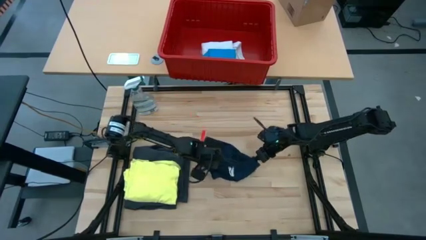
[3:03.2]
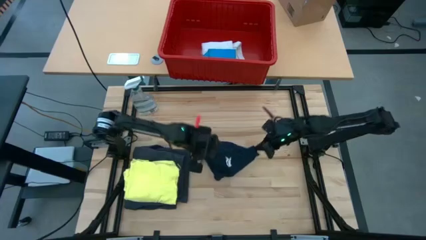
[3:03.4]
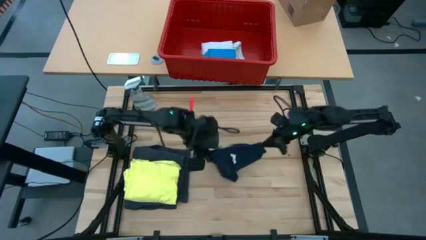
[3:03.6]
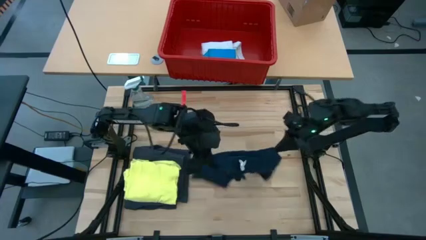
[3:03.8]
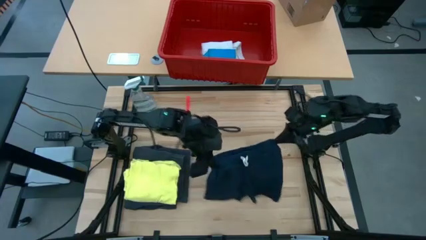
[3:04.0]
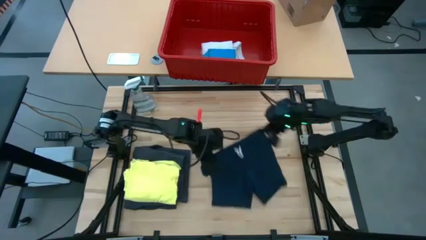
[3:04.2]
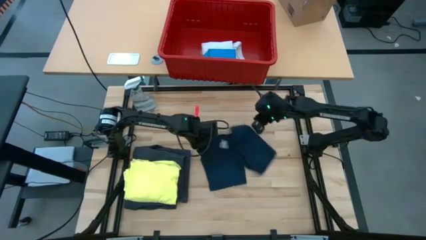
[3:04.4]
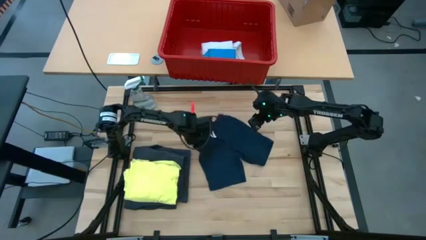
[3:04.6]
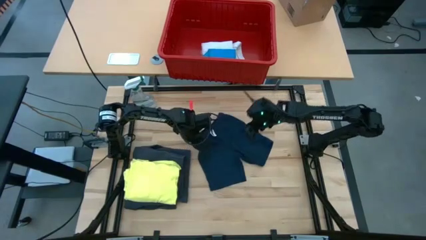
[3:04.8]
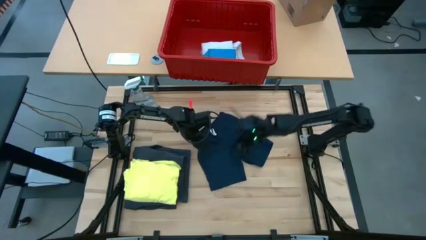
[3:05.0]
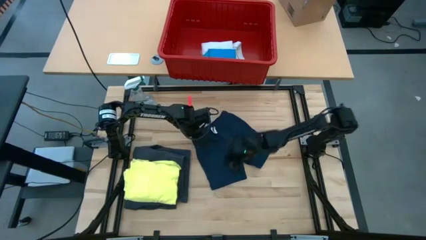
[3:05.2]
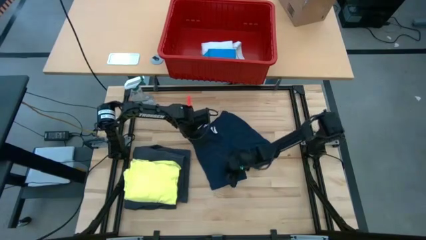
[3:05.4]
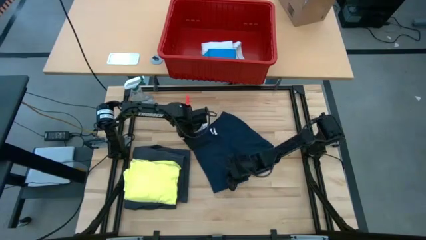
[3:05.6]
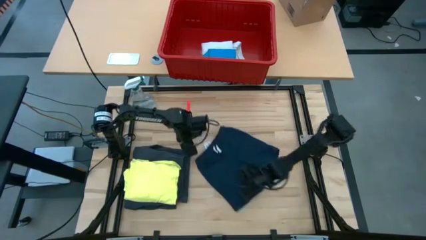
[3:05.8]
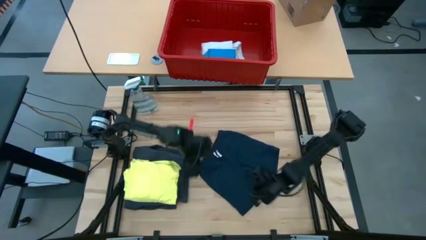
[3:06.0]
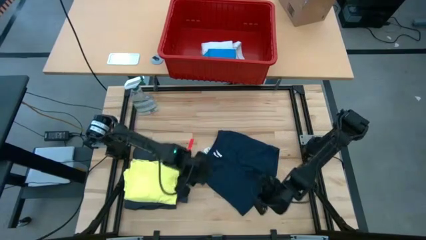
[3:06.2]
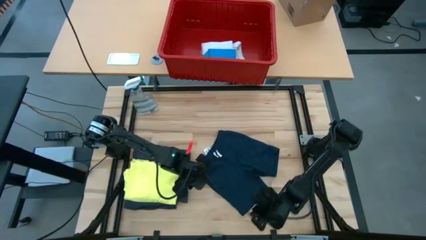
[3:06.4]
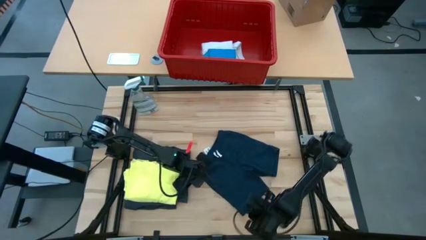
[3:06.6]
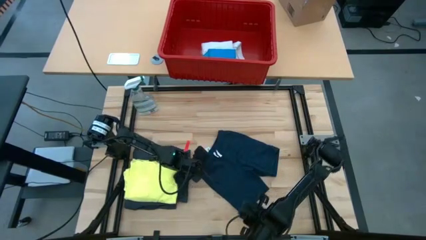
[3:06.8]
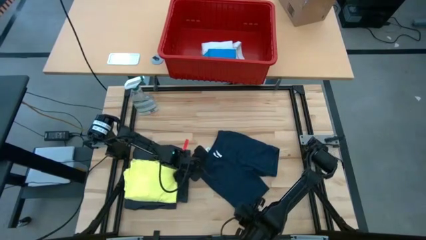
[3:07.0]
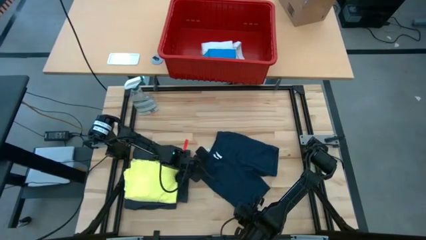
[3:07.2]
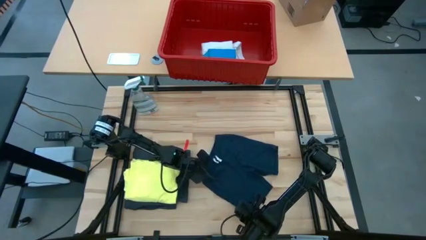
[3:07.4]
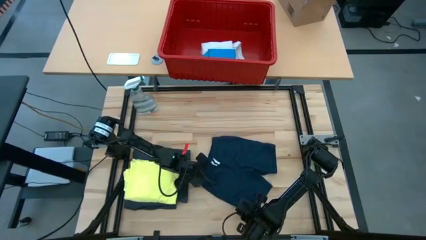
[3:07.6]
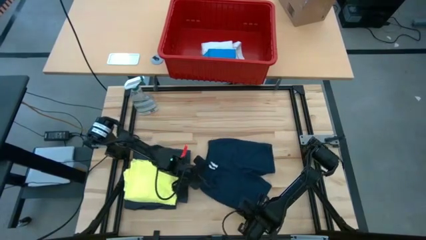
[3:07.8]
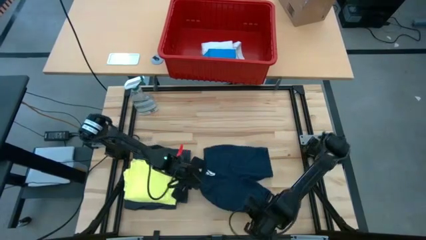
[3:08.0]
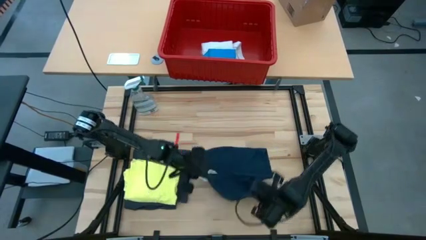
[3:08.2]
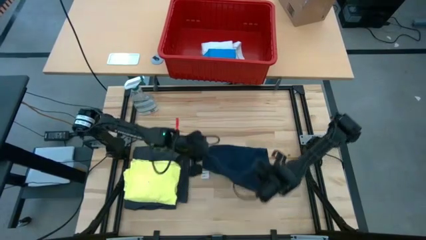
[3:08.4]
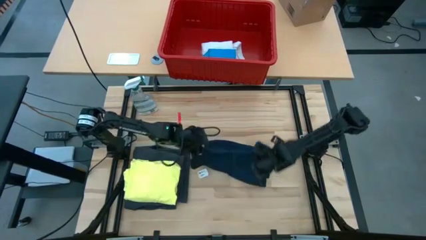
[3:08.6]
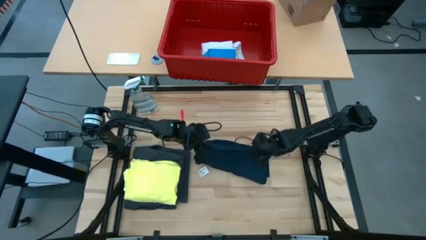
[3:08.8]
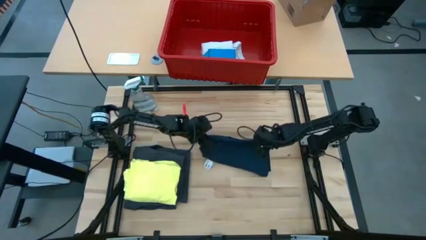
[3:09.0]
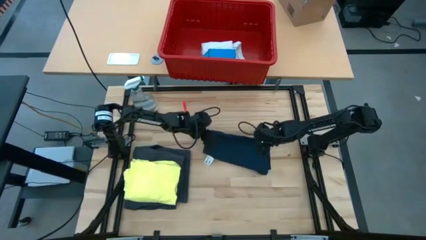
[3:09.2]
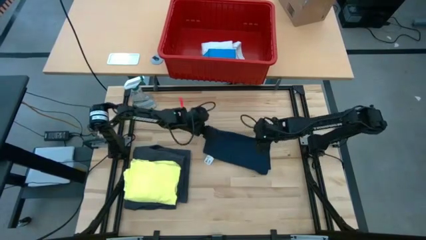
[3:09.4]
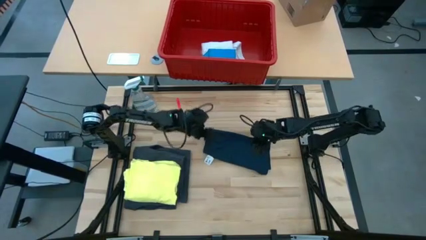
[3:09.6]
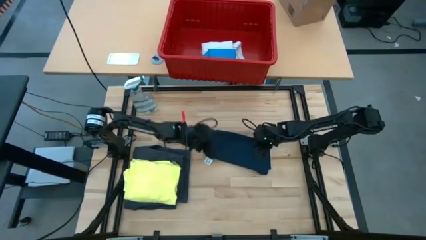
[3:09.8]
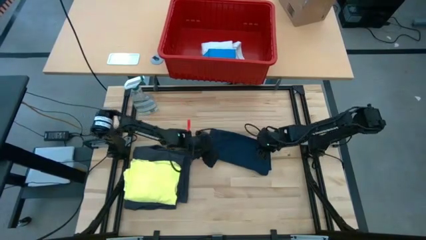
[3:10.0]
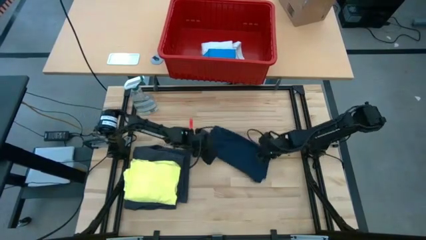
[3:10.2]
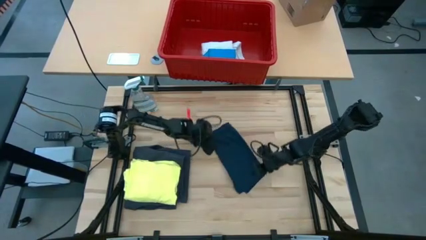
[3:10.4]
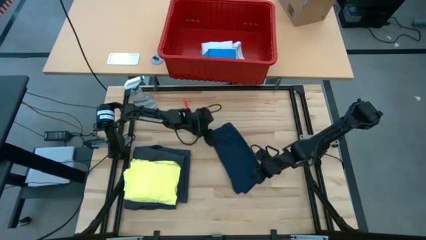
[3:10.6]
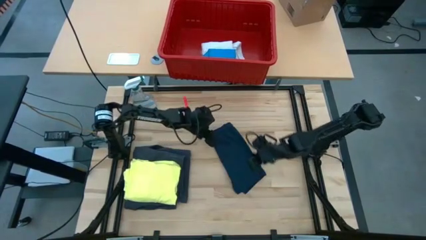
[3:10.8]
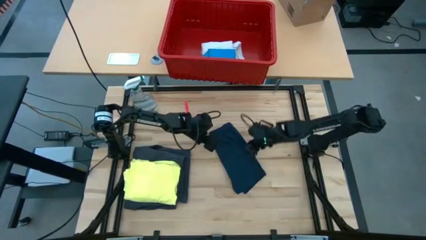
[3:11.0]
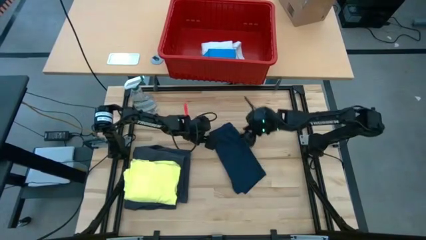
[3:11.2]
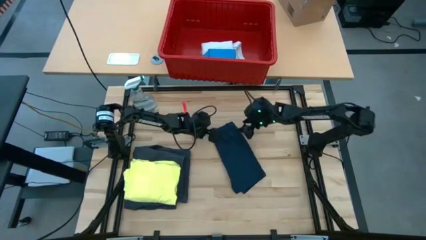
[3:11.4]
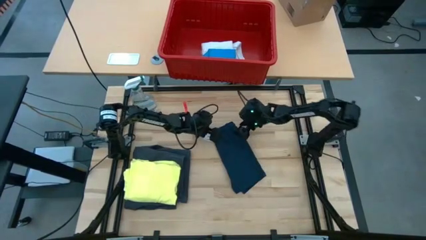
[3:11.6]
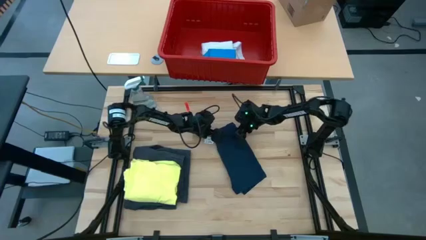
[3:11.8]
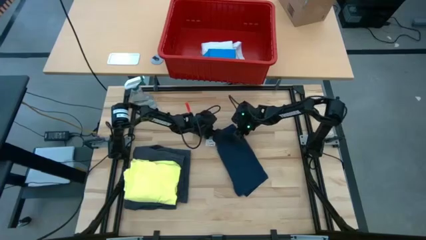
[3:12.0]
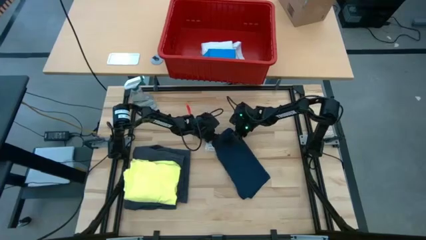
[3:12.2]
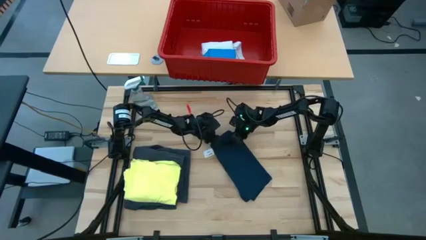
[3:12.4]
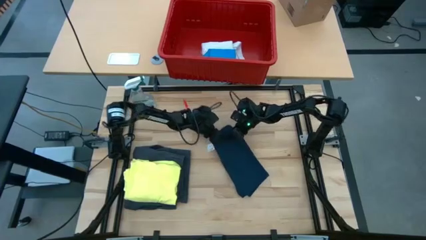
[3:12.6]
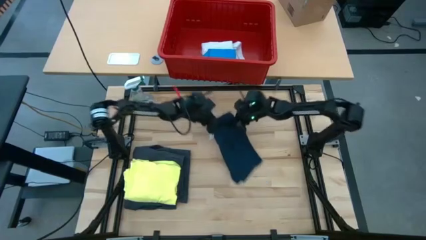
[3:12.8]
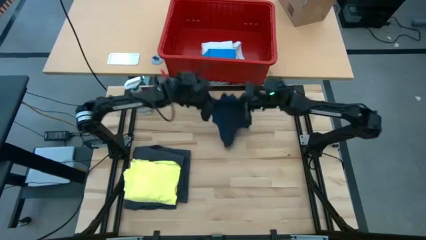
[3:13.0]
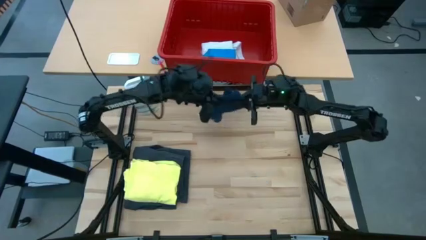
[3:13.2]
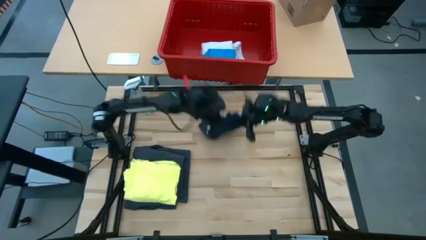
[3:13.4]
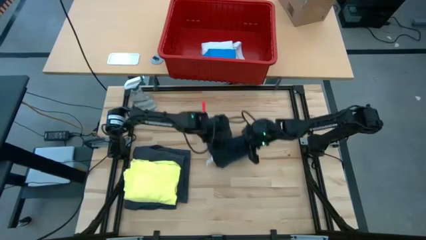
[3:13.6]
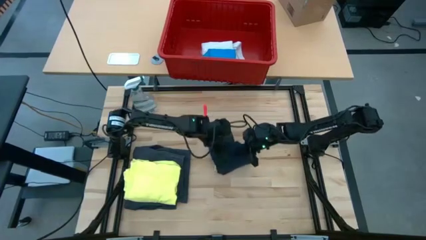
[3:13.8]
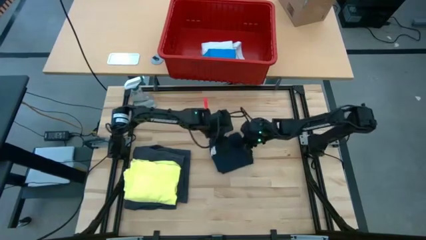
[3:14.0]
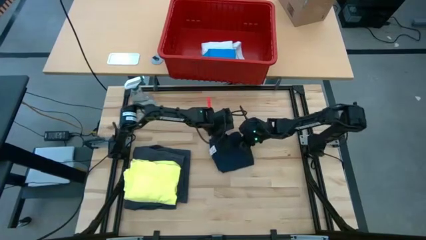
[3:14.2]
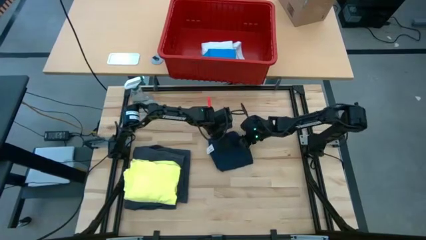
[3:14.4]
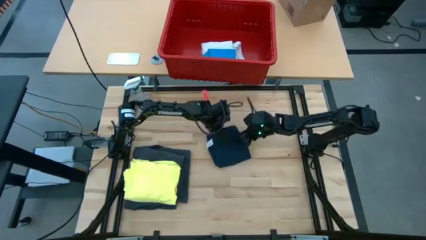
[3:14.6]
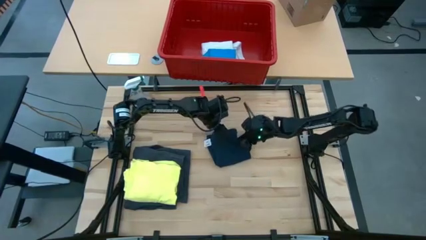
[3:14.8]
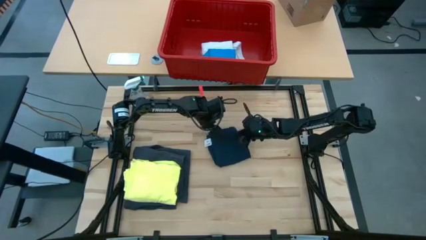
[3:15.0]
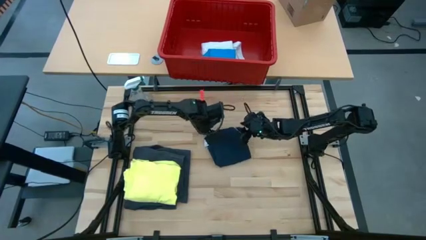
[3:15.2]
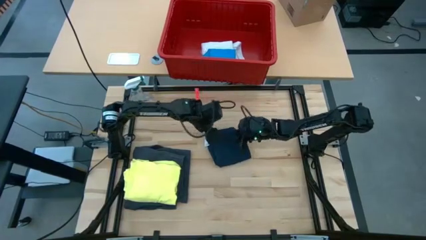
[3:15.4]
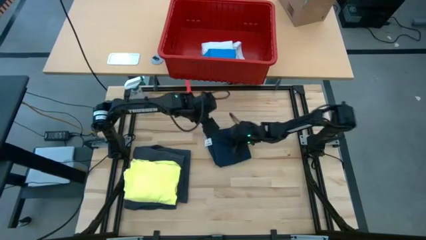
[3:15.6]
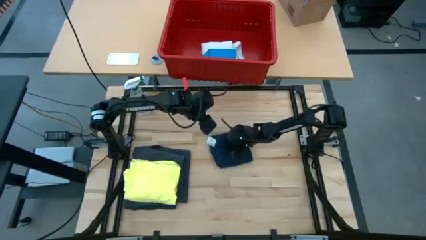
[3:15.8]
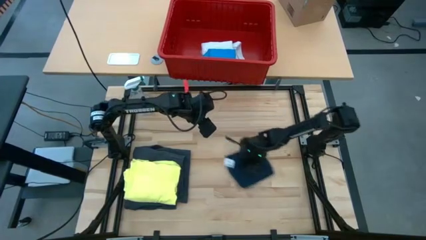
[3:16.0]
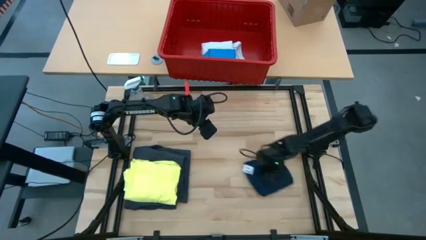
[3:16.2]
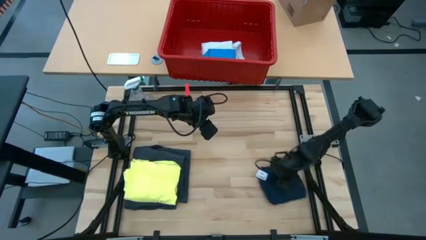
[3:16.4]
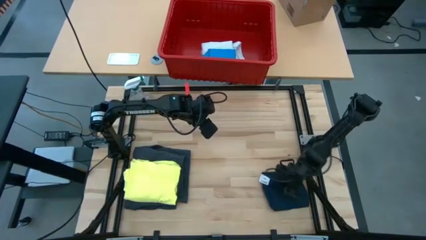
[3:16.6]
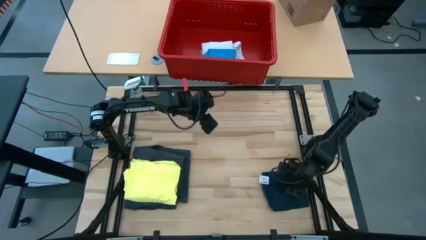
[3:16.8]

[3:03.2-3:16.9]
Task: Fold Laundry from Bin
Fold the dark blue short

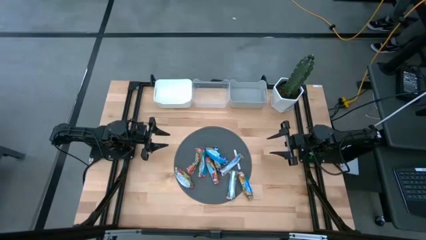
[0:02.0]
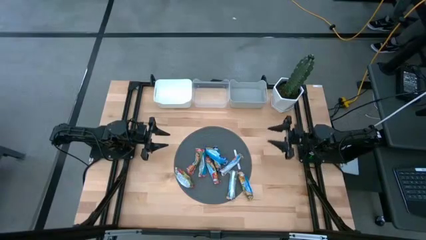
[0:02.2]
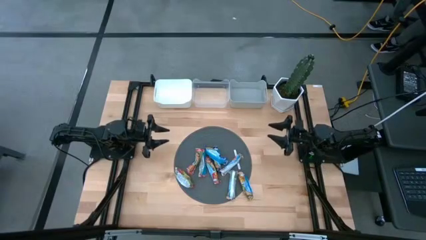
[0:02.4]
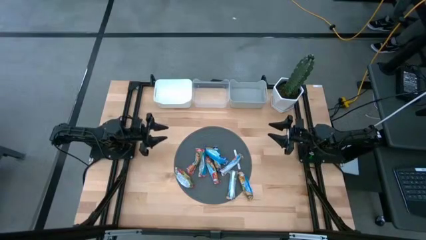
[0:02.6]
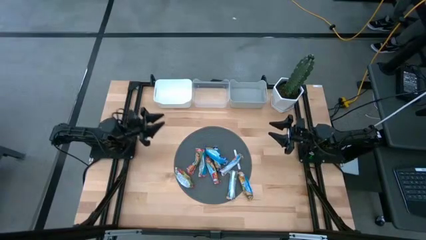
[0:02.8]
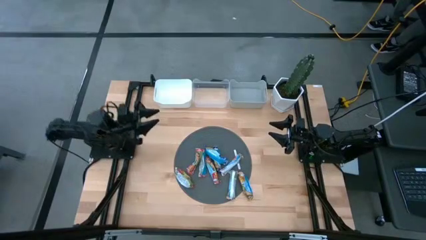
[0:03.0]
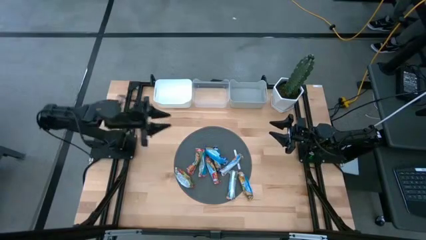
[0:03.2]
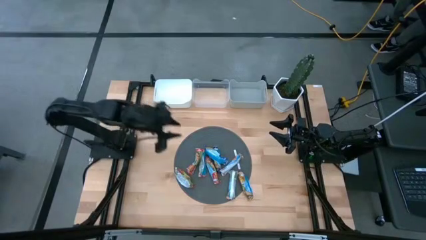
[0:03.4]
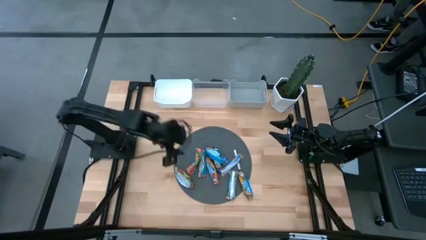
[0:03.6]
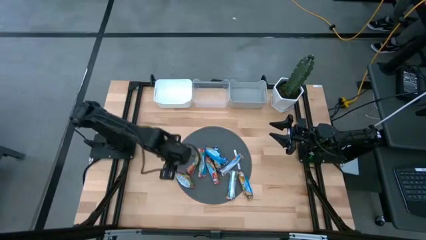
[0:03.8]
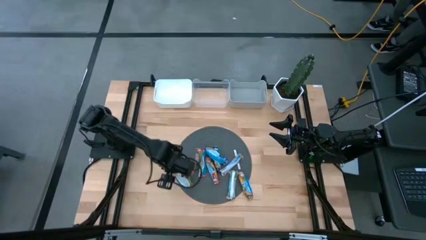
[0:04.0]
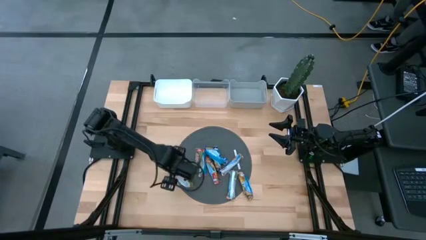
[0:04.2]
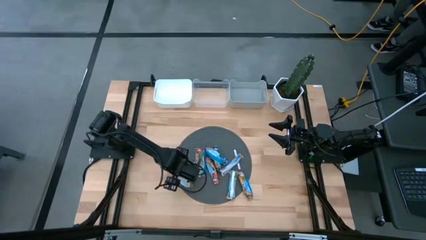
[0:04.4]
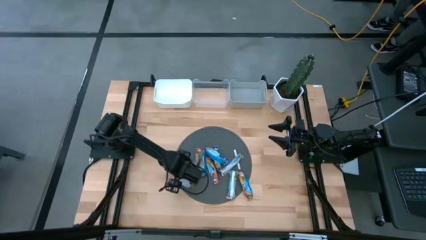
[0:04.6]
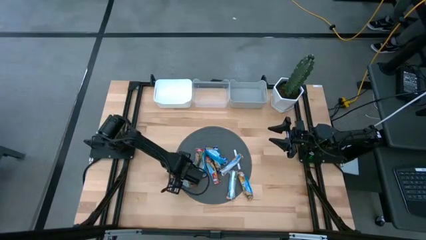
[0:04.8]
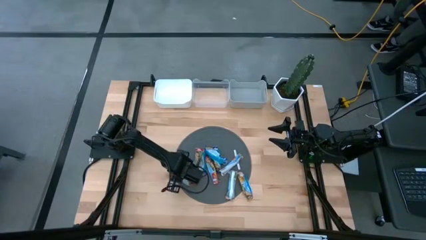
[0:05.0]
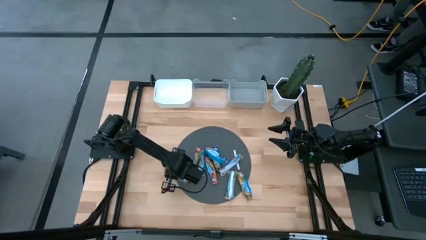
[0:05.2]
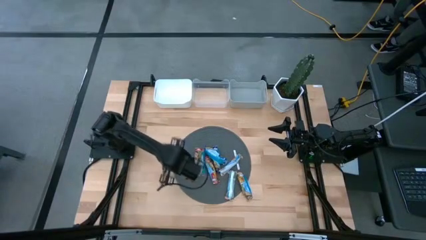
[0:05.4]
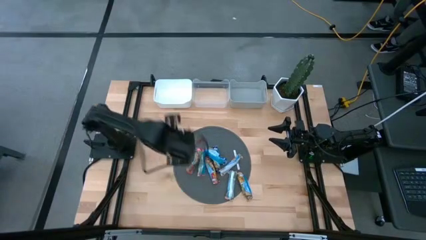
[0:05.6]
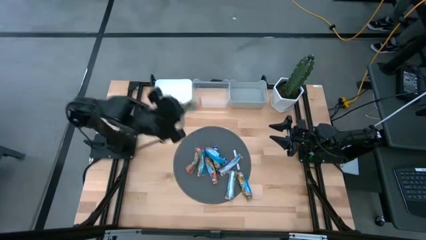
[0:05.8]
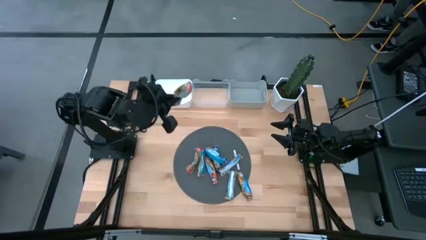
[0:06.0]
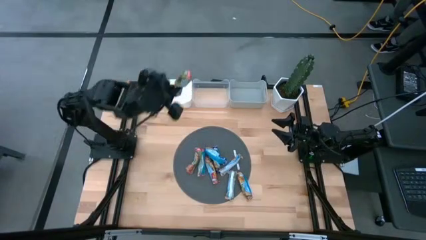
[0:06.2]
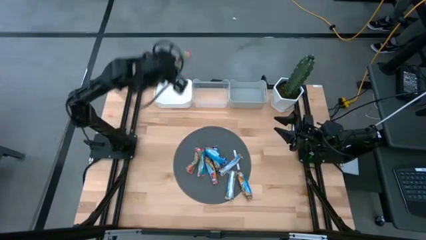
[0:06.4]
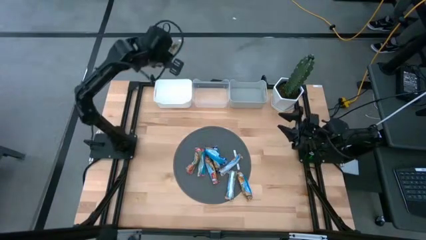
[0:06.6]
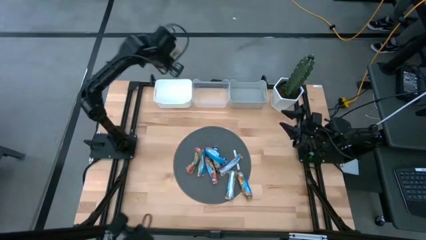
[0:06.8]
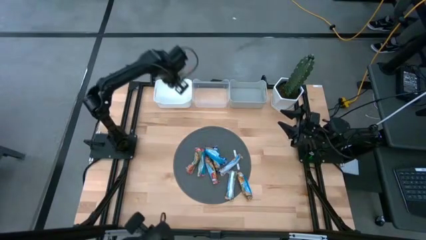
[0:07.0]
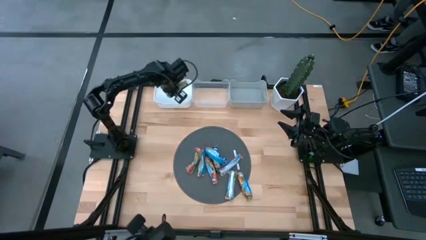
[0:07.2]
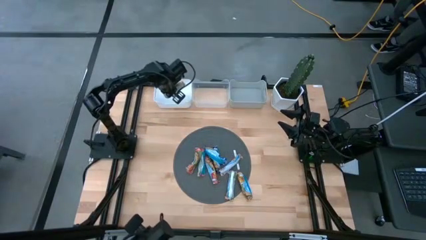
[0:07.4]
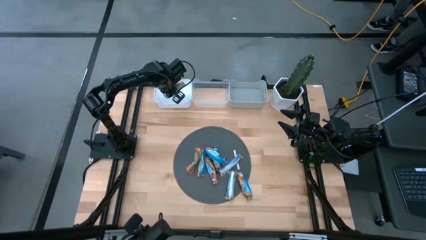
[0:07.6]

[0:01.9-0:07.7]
Task: Pick and place Granola Bars by type
Put the red granola bar into the white bin
